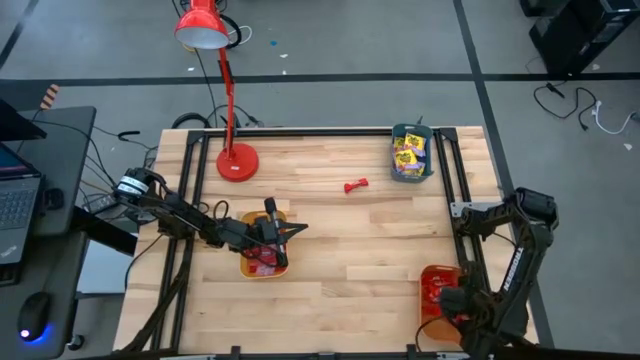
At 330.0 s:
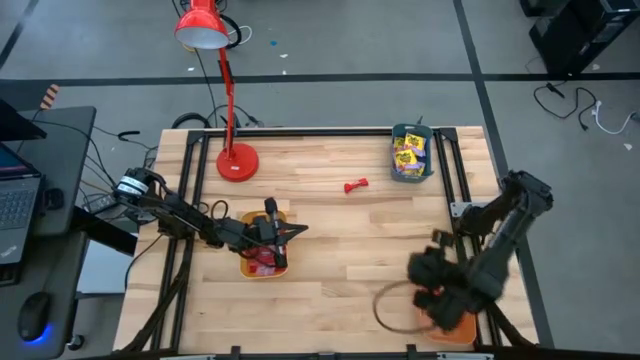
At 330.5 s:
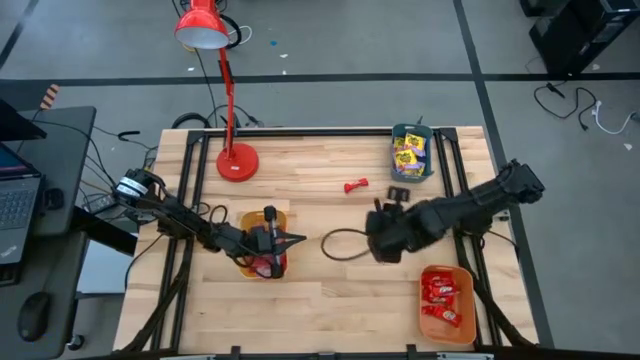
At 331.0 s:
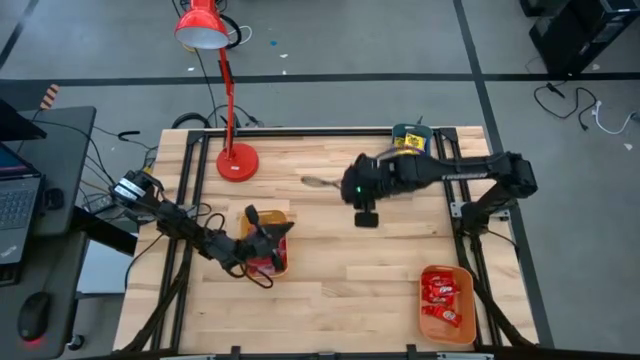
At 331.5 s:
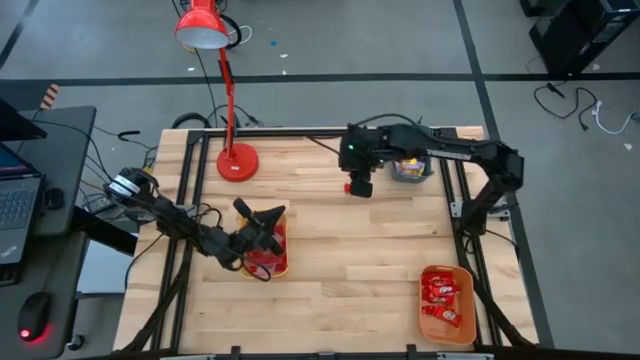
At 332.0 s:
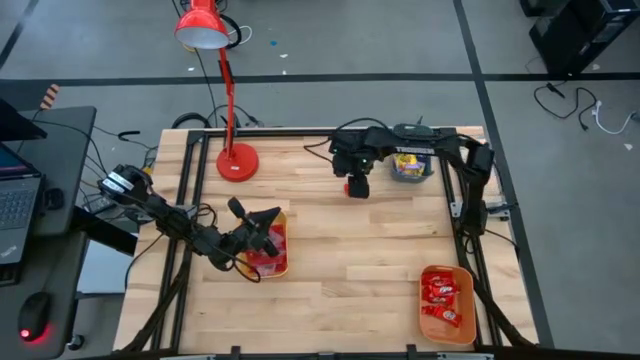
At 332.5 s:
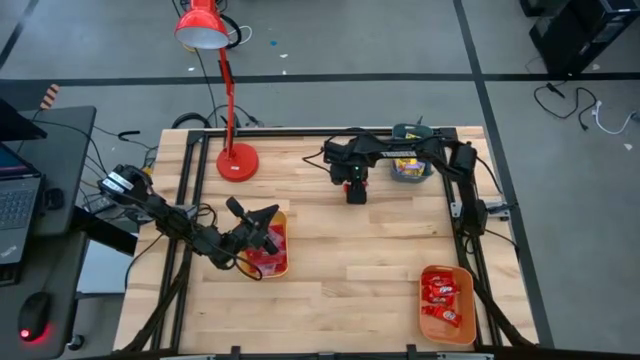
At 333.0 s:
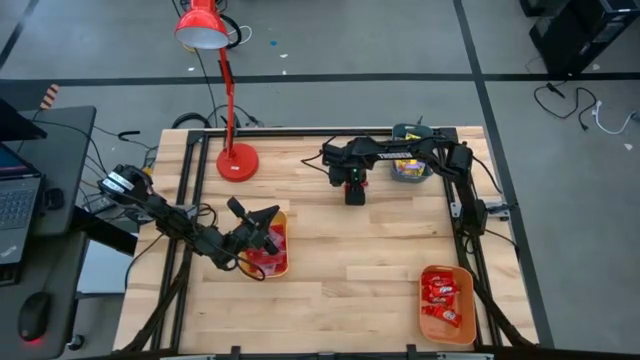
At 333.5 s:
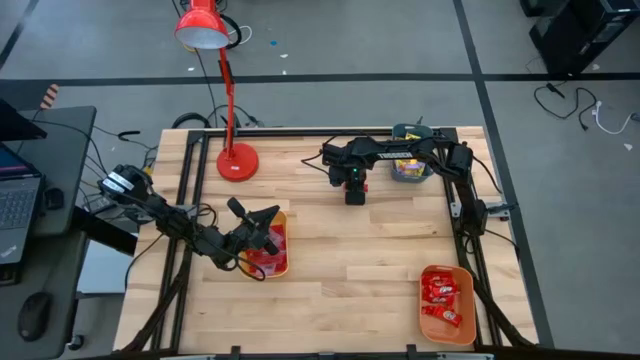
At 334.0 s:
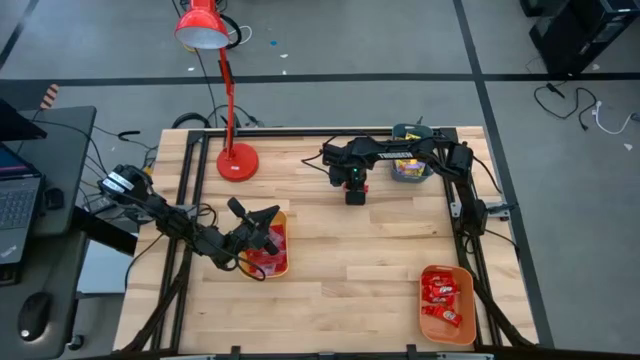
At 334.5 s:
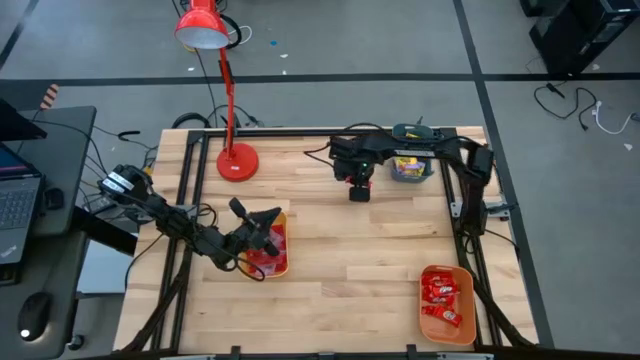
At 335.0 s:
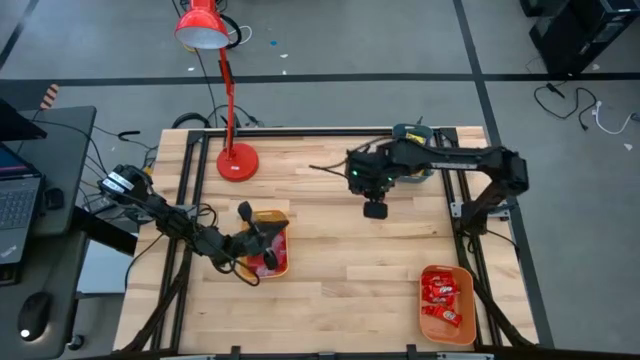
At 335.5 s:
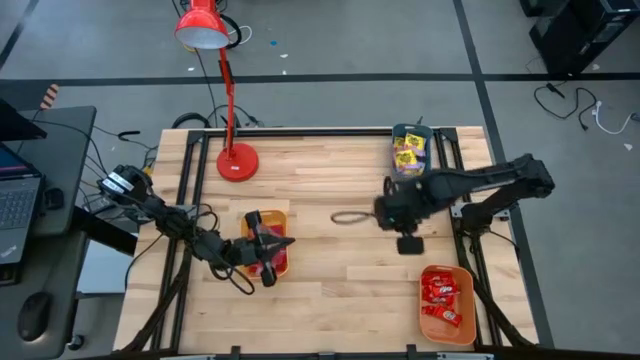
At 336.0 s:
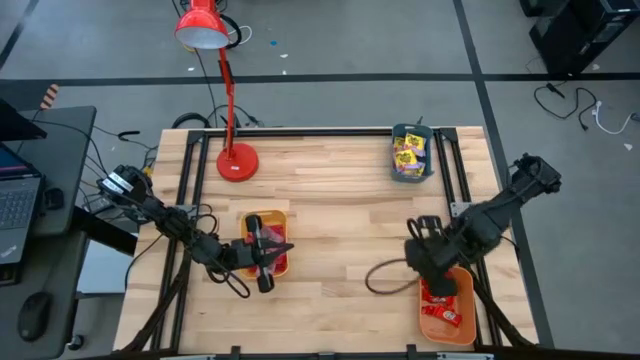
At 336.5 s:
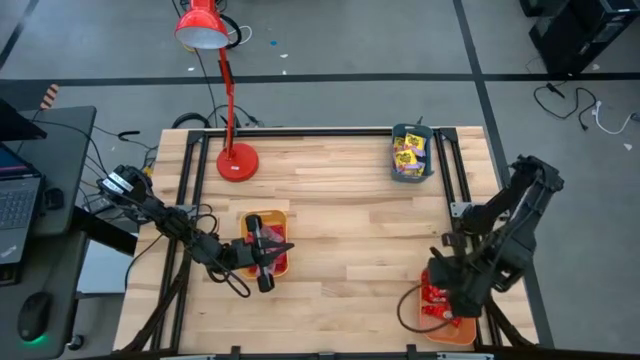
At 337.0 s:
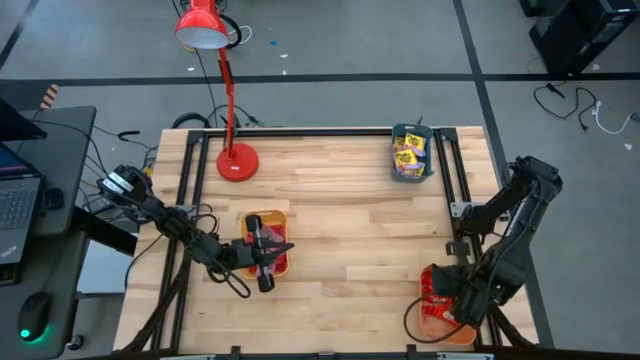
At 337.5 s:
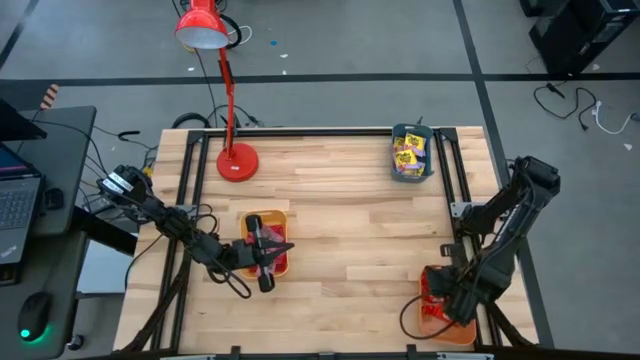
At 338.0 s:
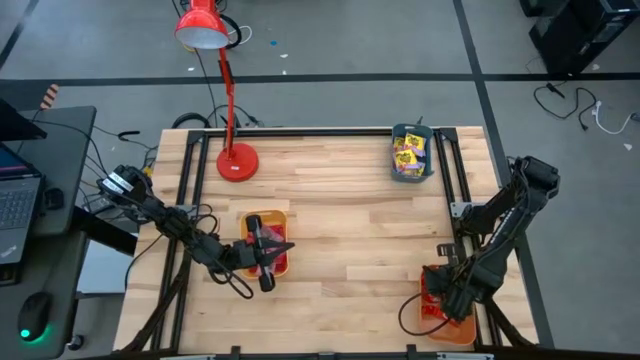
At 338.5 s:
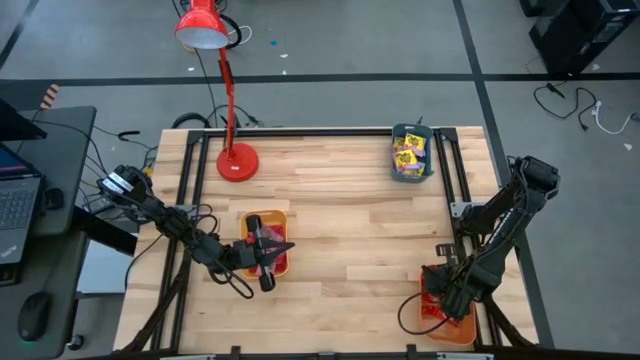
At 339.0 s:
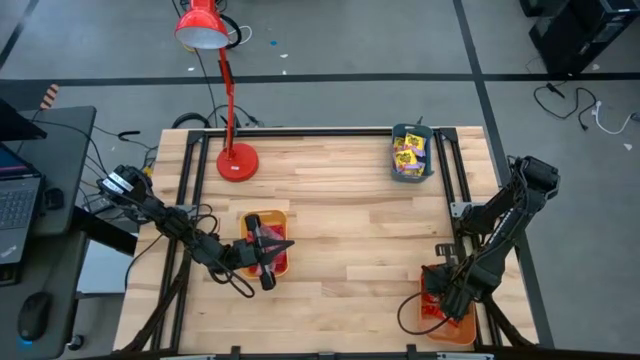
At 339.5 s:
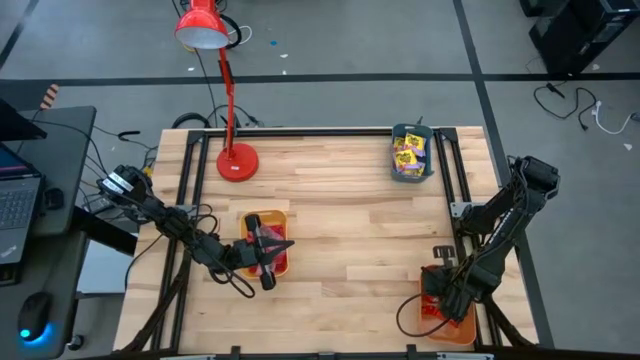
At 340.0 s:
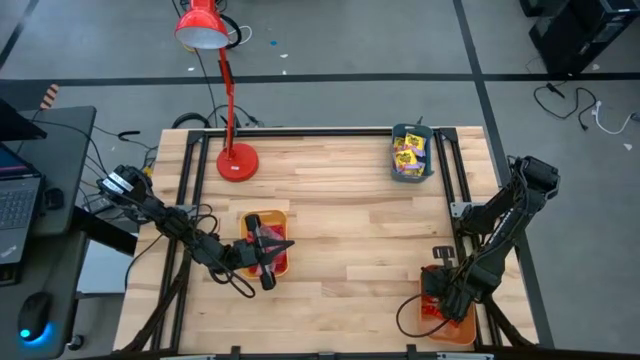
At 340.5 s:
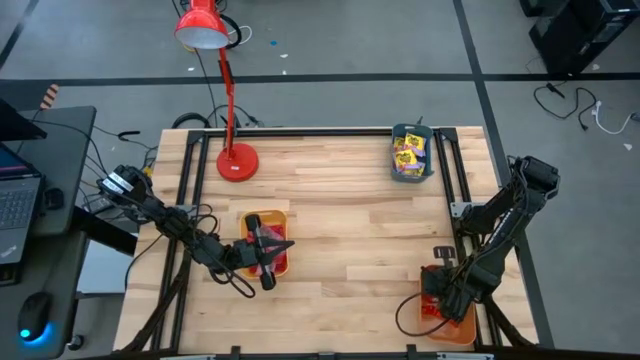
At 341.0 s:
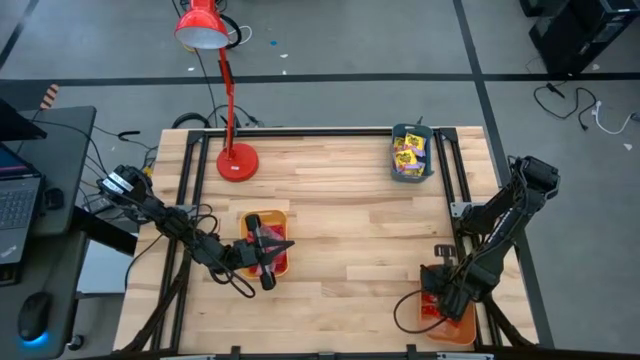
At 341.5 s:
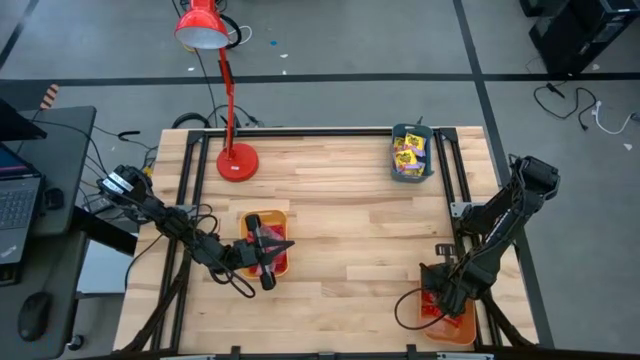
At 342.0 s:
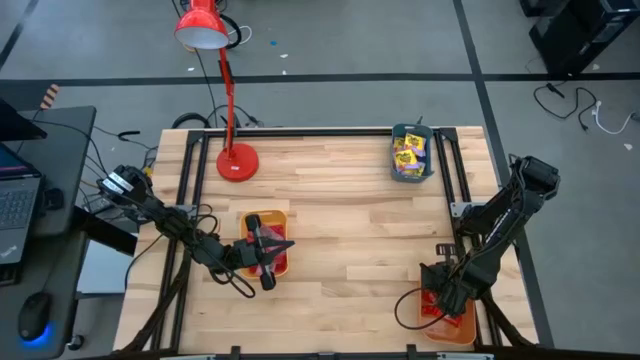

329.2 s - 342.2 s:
Task: Sort candy
Put the red chocolate into the orange bin

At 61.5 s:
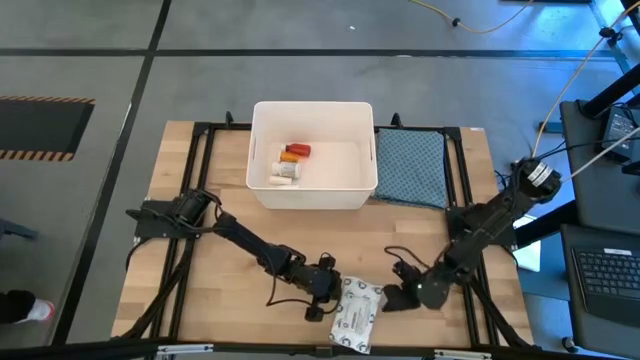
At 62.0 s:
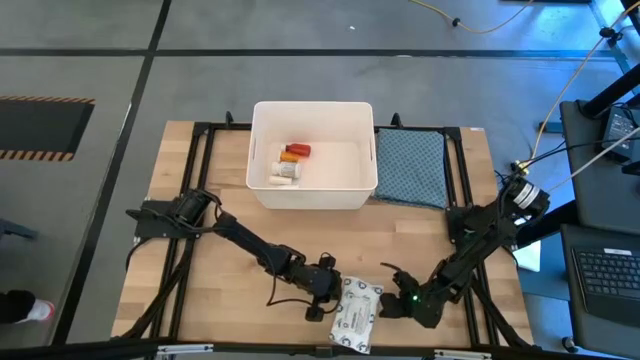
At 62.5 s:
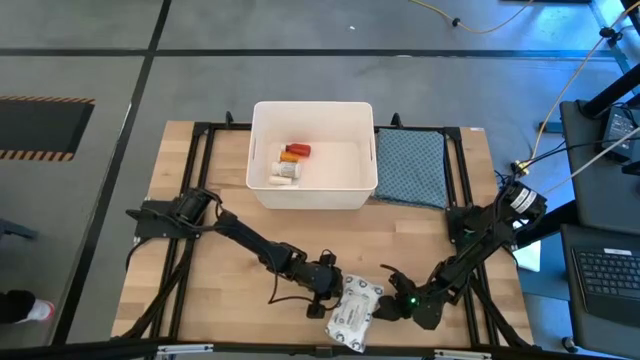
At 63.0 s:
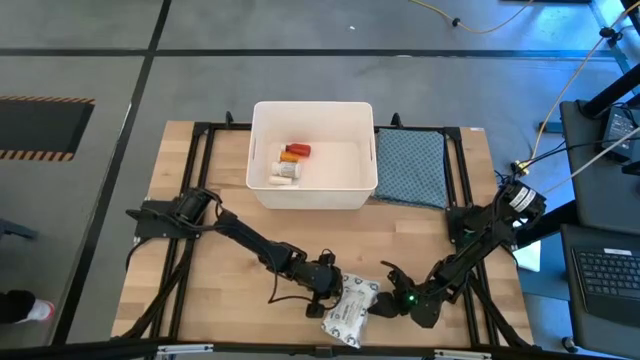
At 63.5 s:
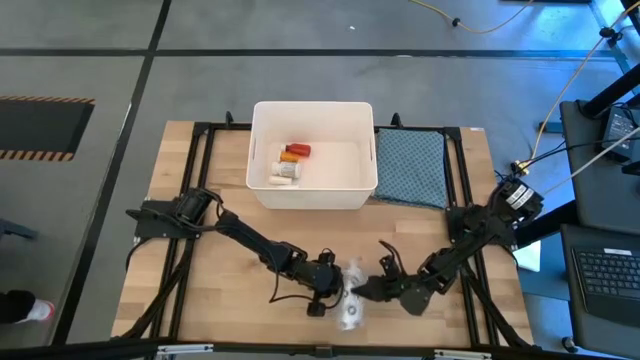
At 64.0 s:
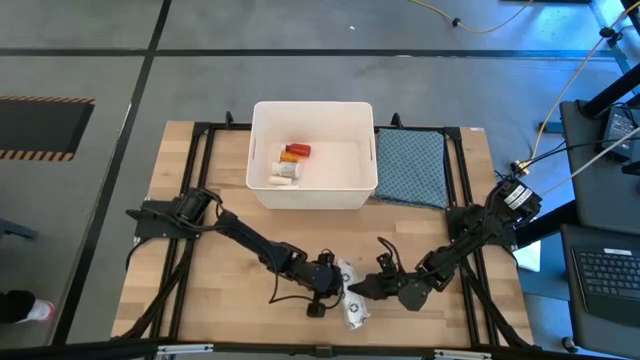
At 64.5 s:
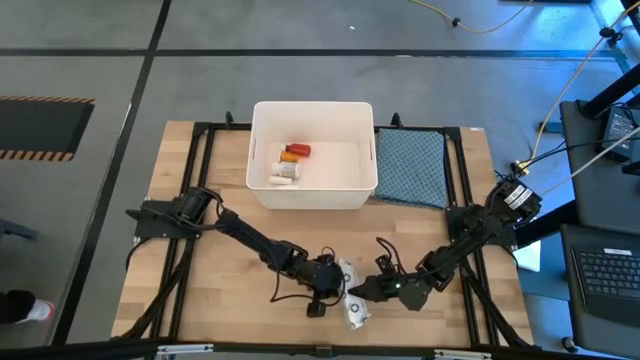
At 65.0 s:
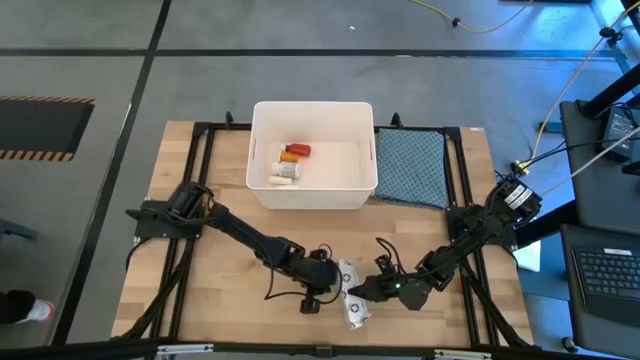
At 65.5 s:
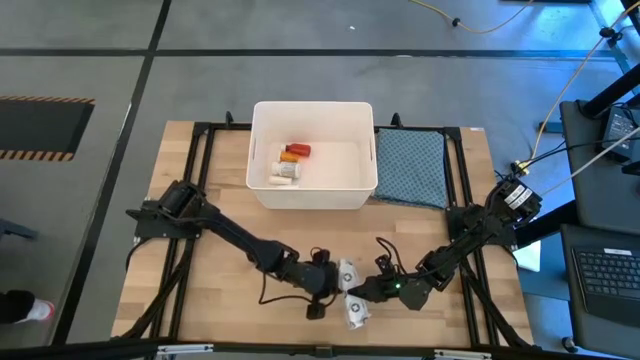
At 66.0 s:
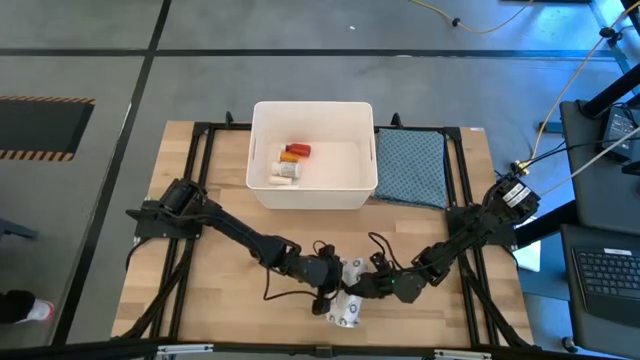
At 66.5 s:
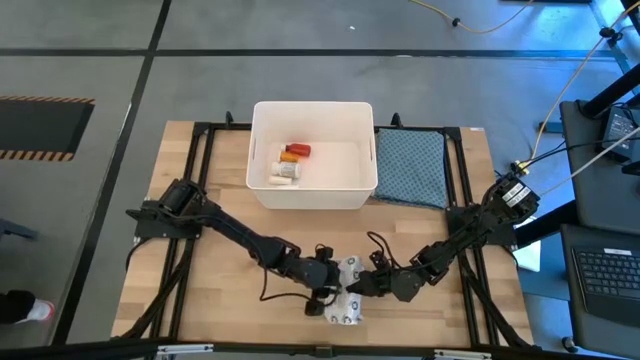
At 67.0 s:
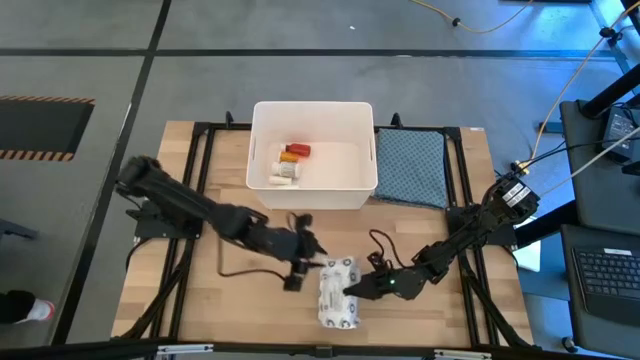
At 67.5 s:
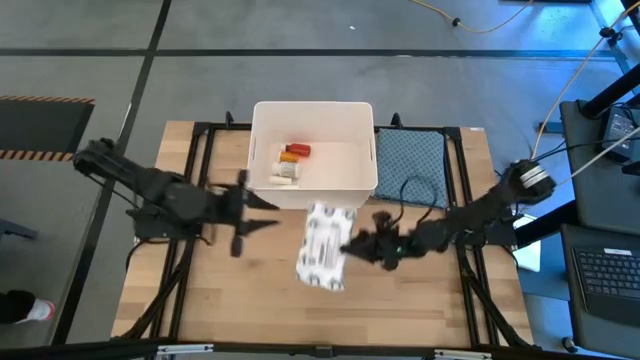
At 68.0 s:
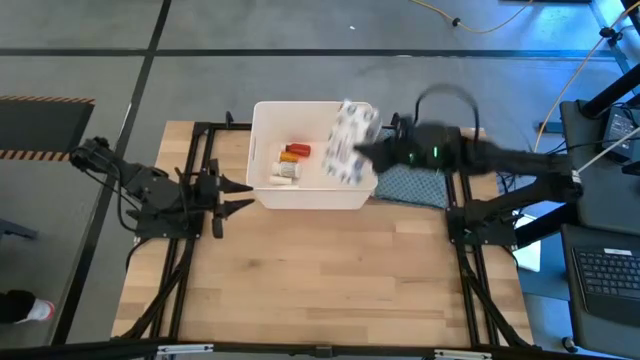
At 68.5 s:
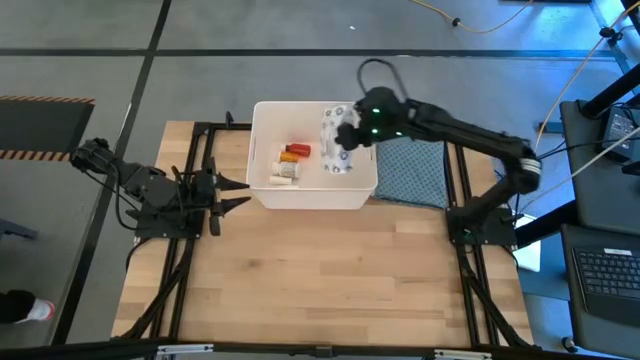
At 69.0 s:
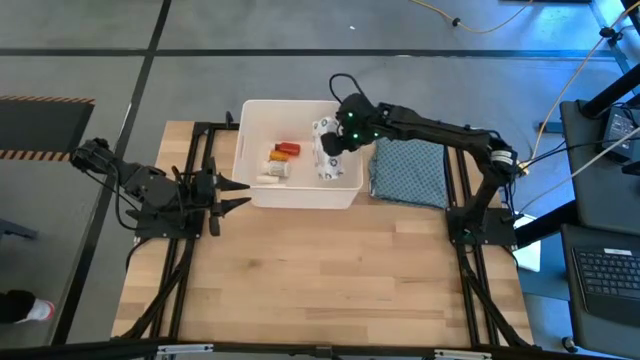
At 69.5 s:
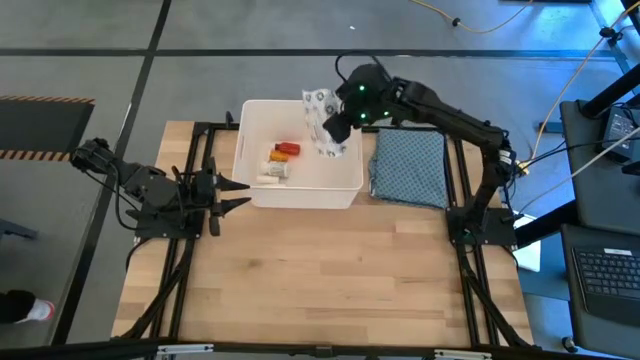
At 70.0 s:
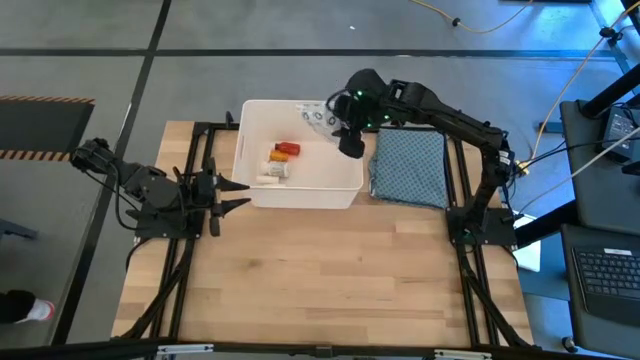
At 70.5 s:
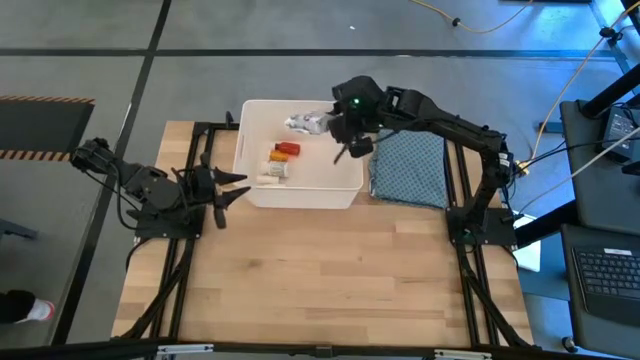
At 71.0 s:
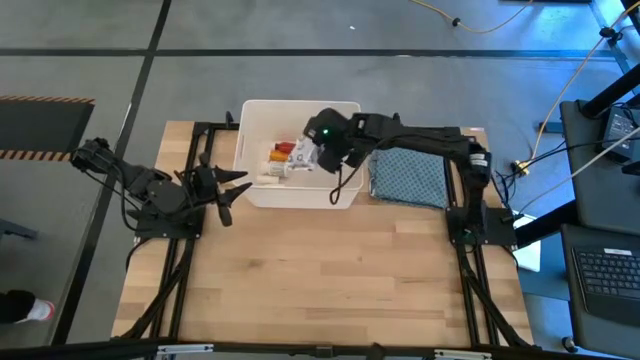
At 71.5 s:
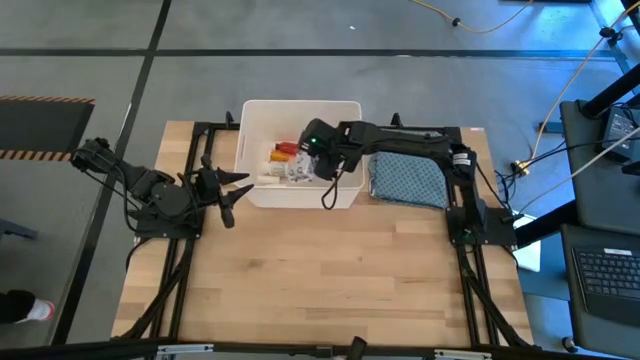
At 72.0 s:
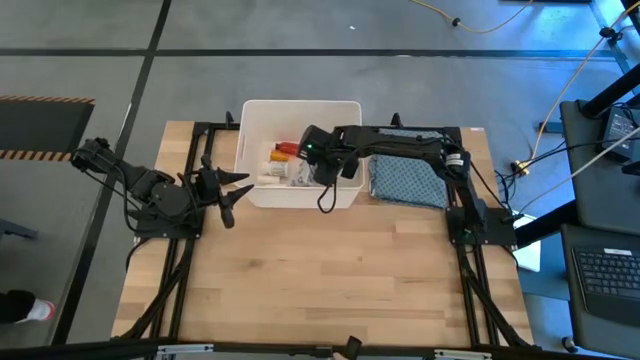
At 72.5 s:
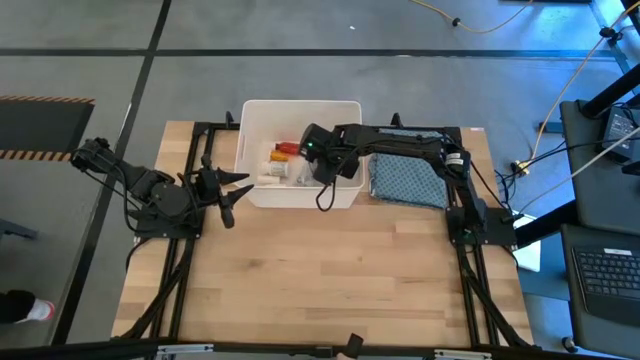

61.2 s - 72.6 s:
Task: Pick & place medical supplies in basket/bin
Put the white mailer bag into the white bin
